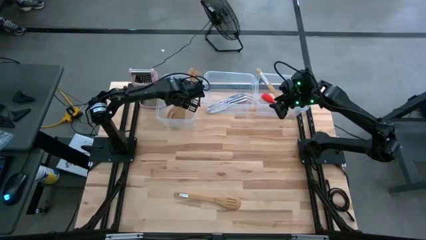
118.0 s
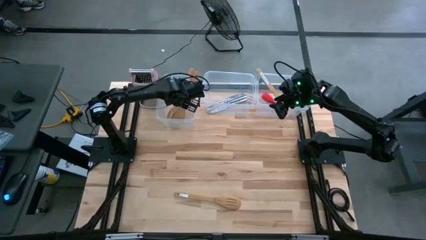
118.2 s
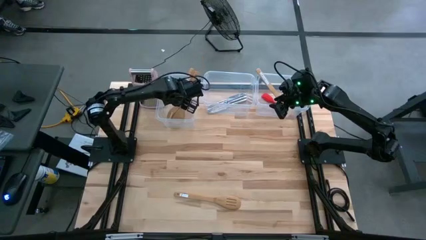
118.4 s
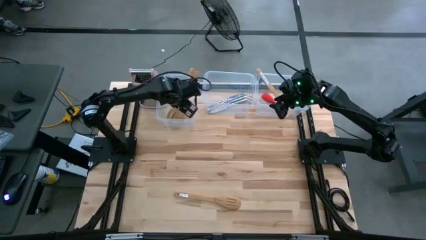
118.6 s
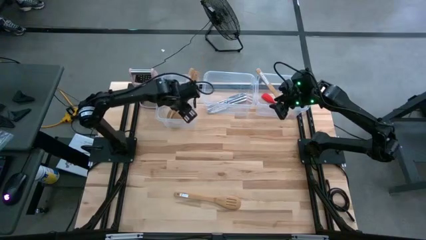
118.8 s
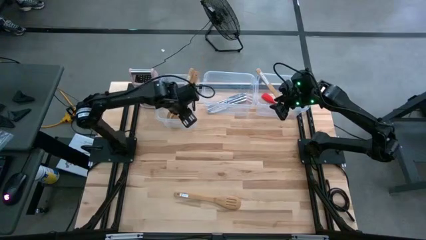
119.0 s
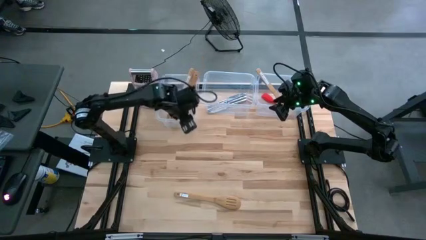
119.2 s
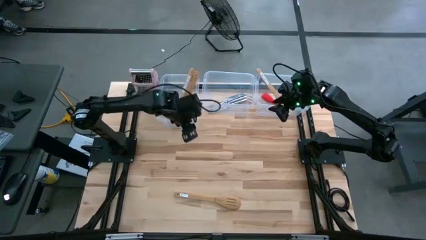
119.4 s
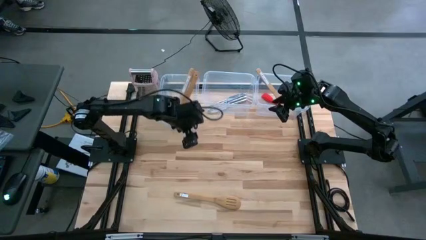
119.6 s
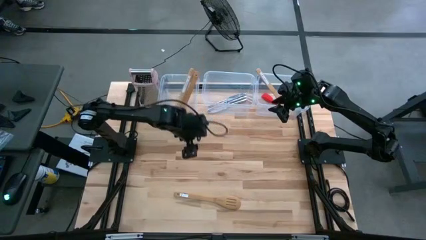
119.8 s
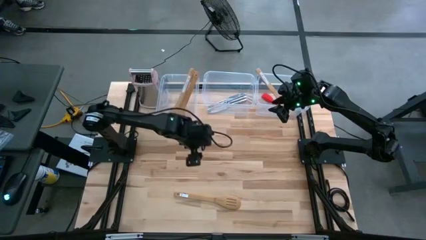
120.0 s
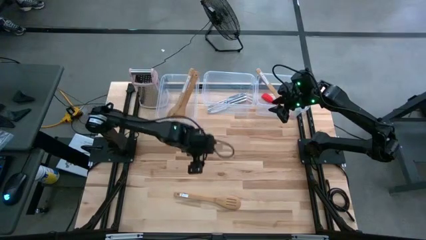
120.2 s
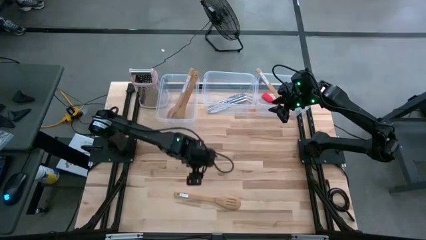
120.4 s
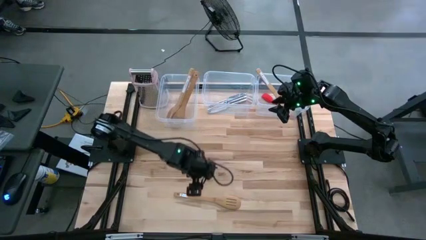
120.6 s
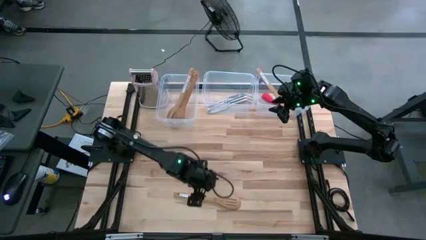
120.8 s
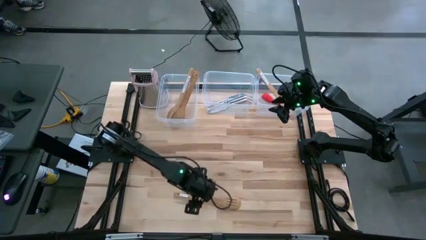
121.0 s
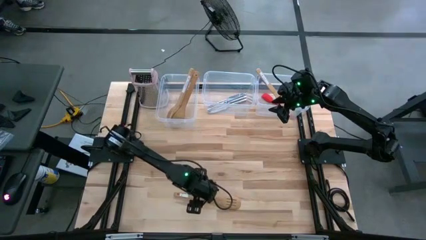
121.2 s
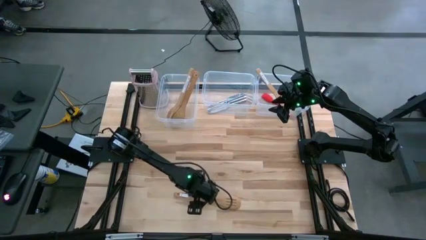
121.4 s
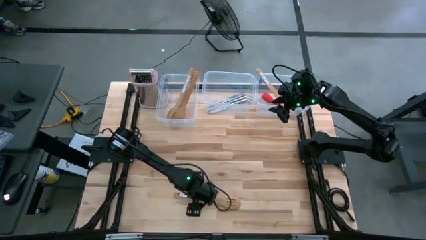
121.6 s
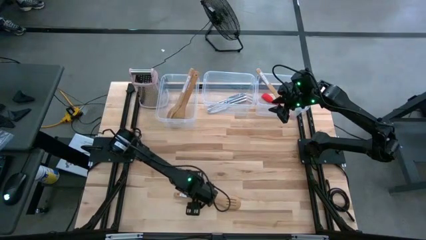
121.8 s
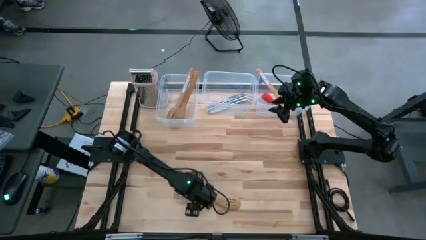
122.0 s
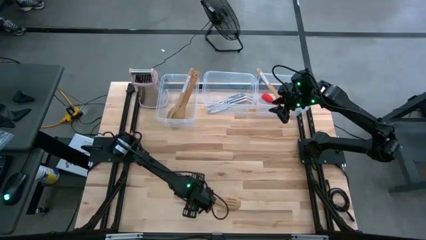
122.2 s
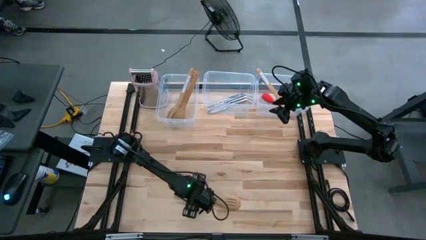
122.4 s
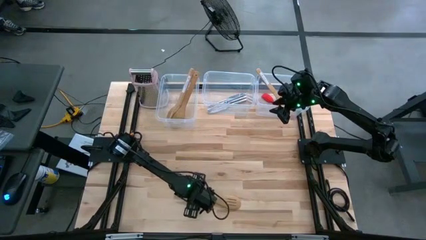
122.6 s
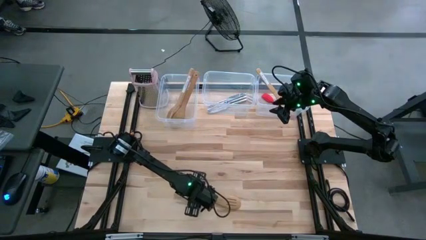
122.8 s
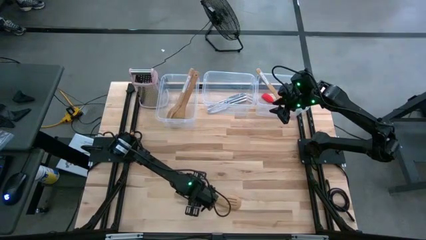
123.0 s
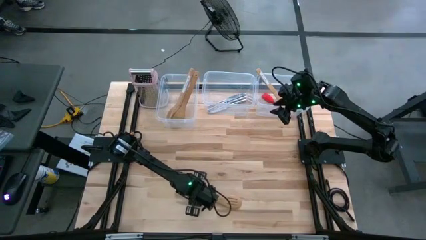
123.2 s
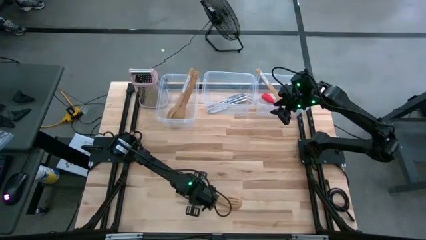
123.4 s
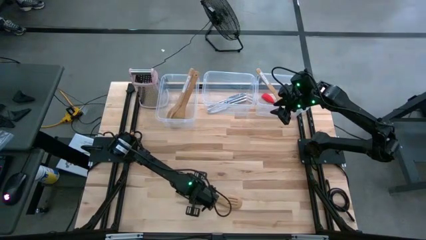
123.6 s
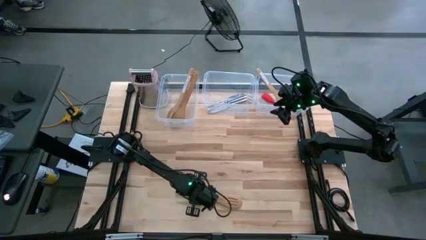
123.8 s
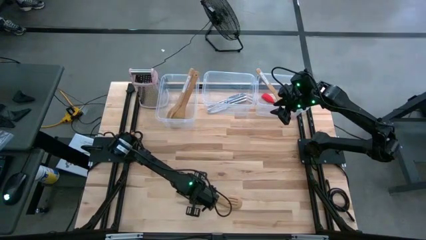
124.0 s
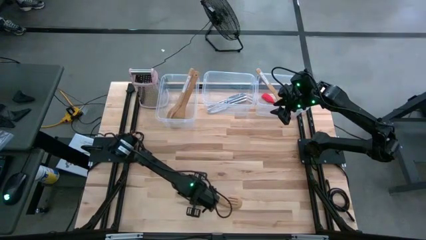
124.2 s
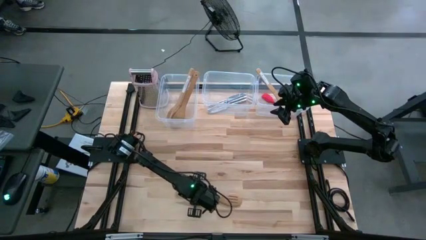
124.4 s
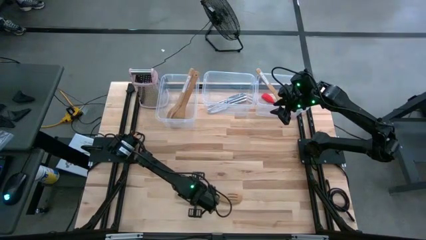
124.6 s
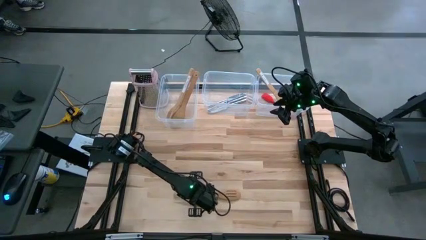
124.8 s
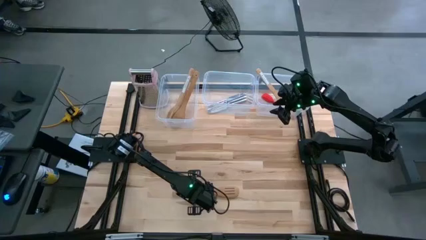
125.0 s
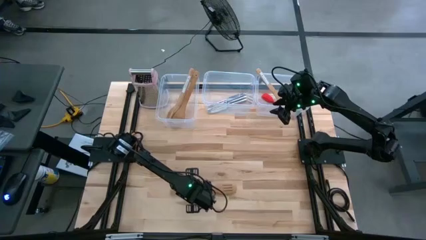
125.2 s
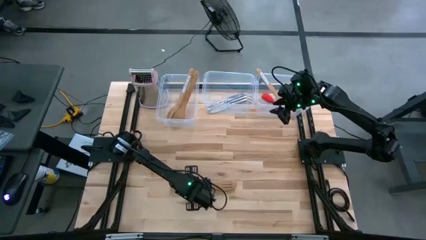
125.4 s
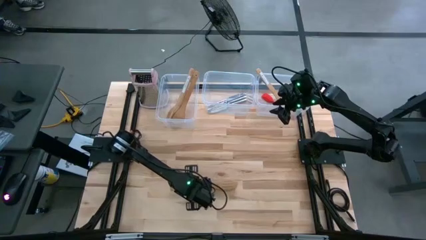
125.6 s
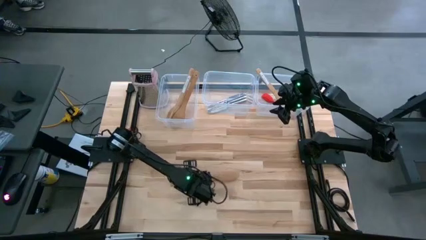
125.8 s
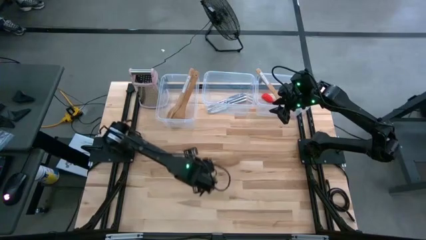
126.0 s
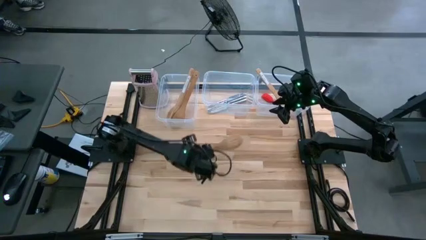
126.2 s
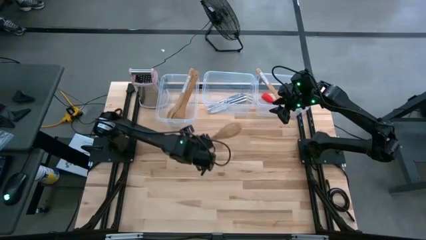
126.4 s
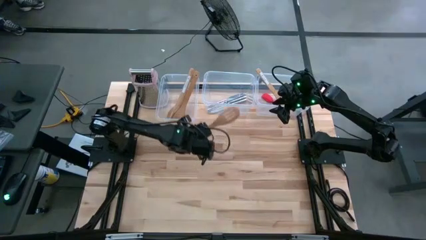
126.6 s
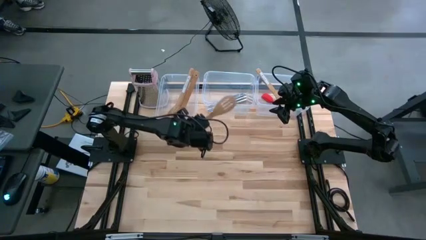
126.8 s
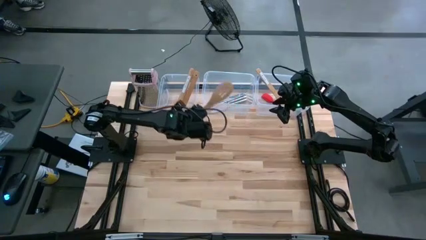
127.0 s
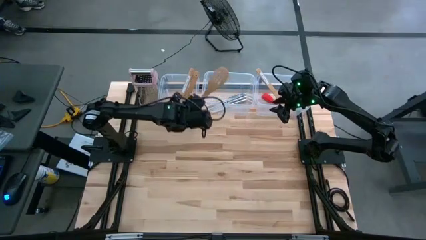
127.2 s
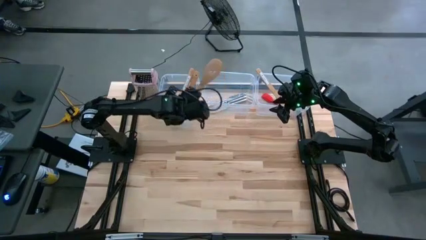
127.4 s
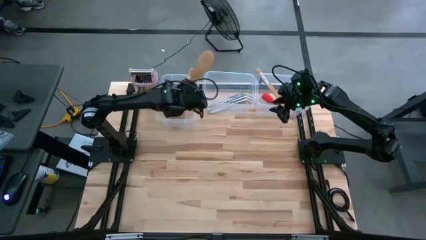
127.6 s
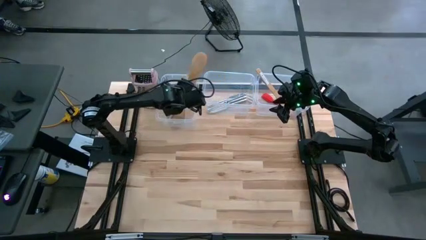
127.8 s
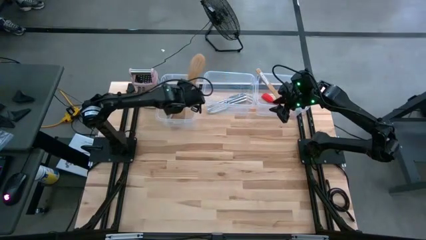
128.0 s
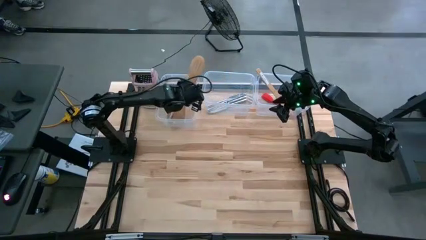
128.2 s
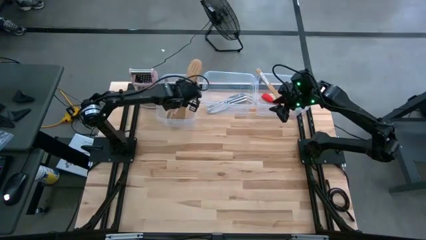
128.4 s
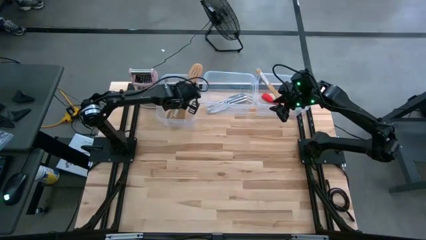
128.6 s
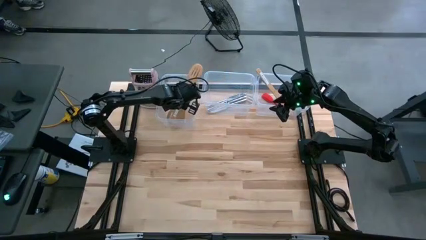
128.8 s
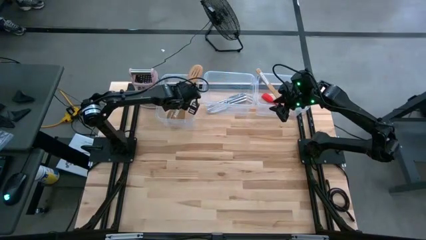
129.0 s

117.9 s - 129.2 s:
Task: Pick & Place Kitchen Items
Put the brown slotted serving spoon into the left transparent container

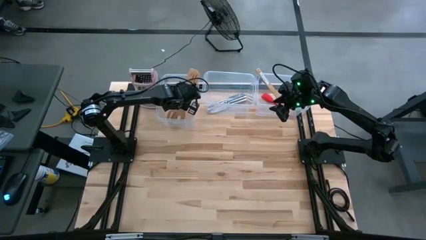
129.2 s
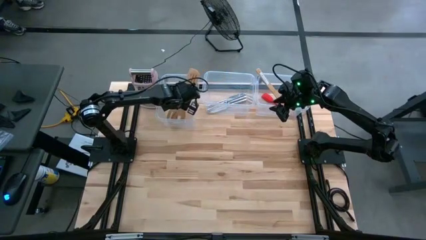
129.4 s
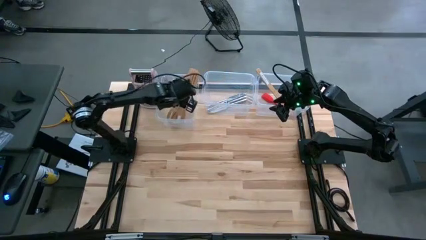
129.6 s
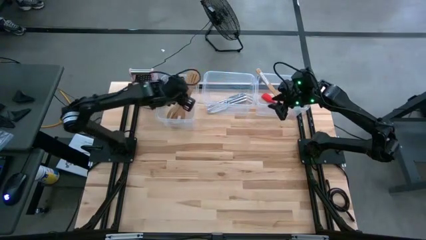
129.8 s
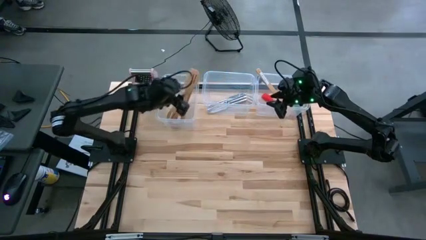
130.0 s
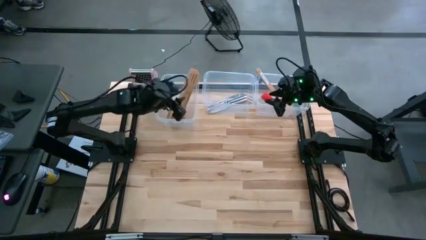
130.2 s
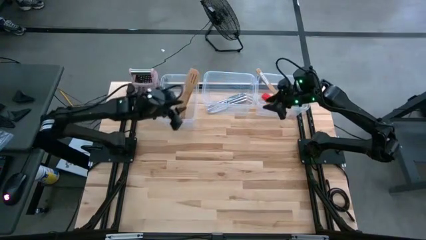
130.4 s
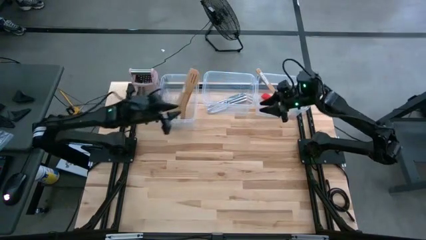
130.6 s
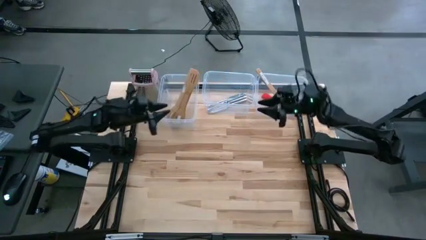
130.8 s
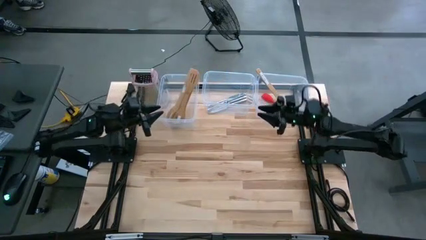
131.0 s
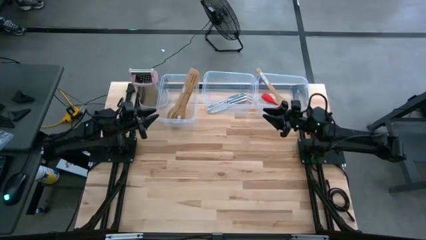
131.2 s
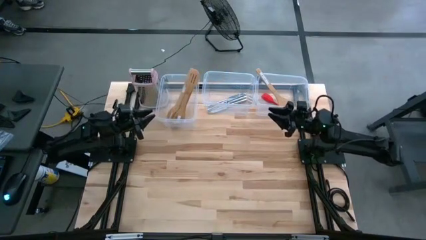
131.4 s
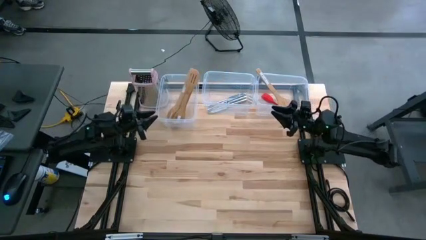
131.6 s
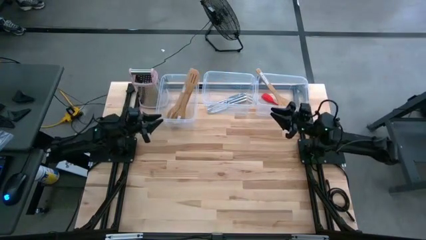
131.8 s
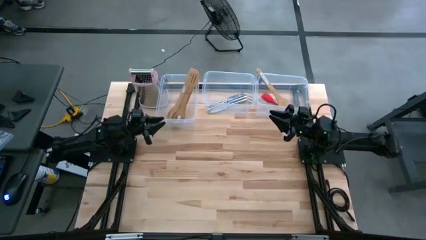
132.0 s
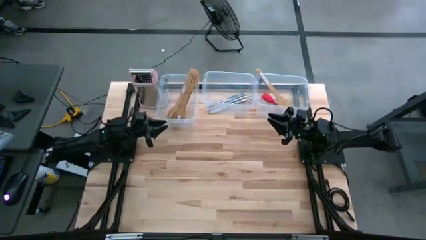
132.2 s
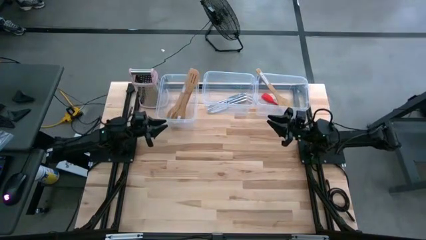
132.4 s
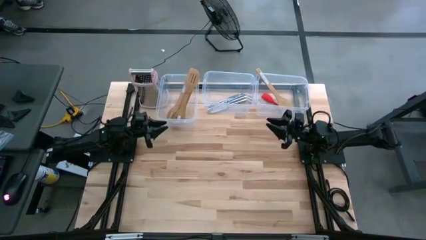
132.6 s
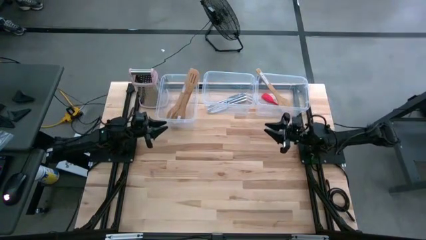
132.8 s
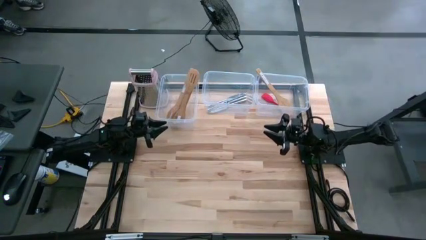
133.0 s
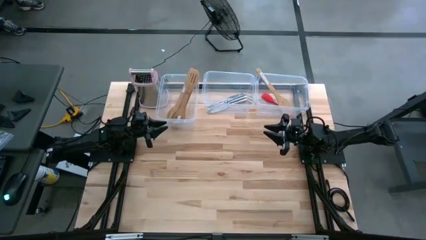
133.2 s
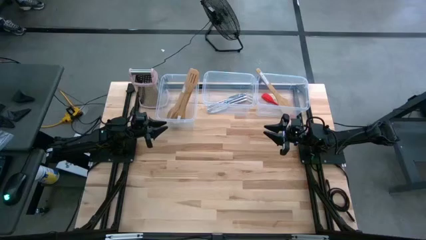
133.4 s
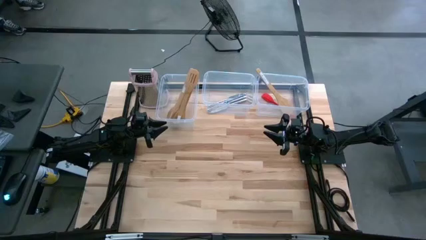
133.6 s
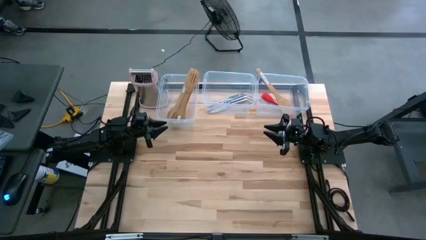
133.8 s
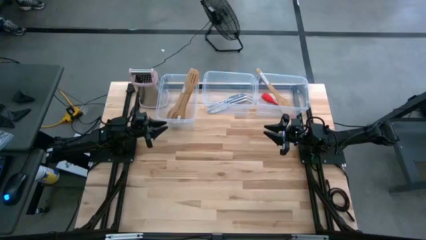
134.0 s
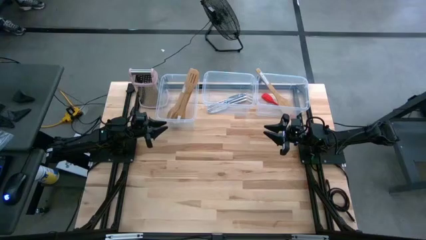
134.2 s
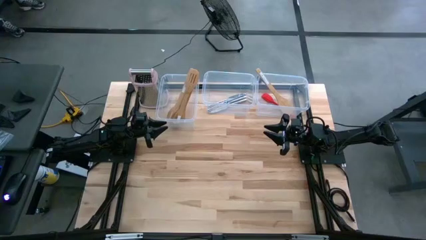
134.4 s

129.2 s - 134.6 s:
Return to Home Position
